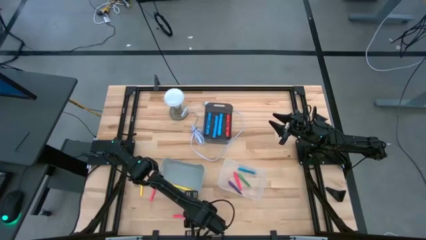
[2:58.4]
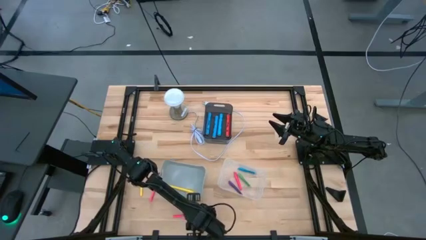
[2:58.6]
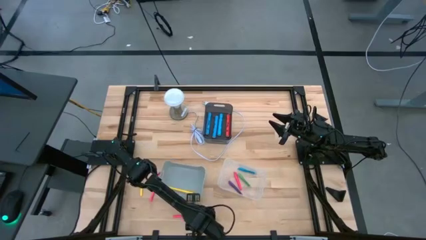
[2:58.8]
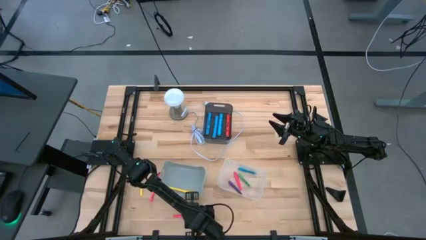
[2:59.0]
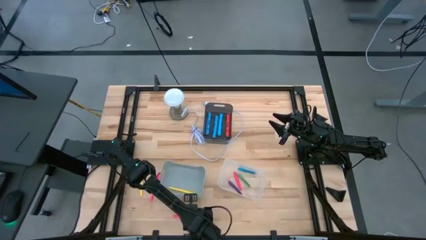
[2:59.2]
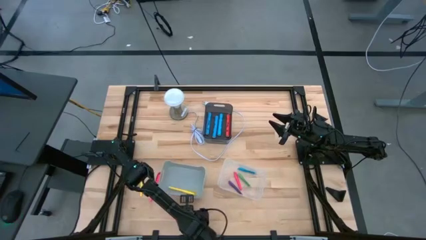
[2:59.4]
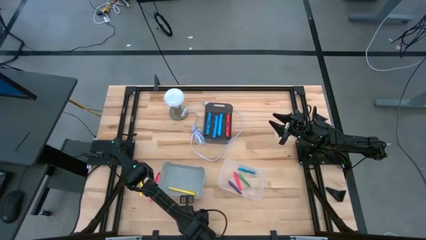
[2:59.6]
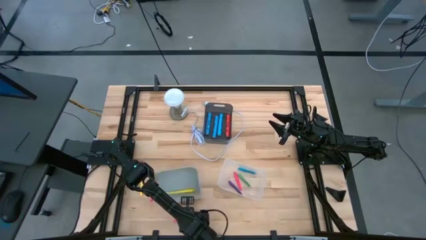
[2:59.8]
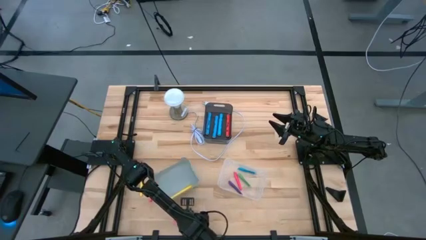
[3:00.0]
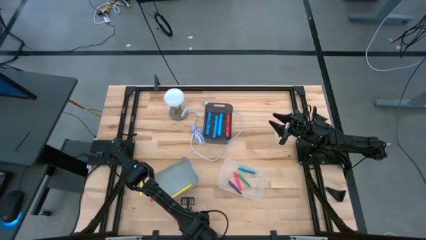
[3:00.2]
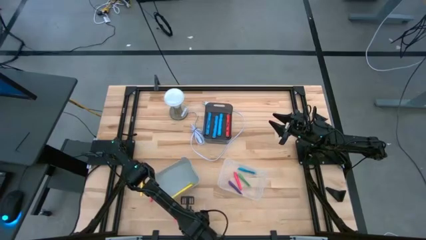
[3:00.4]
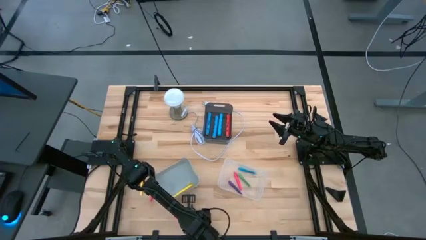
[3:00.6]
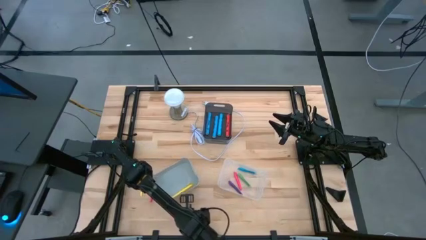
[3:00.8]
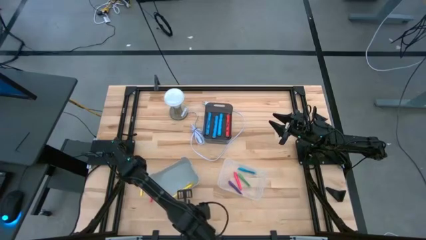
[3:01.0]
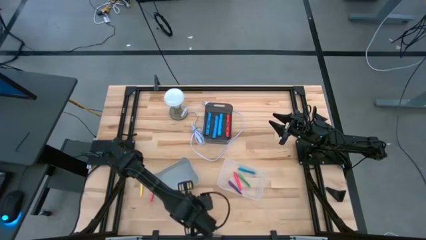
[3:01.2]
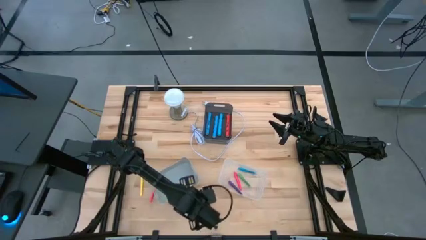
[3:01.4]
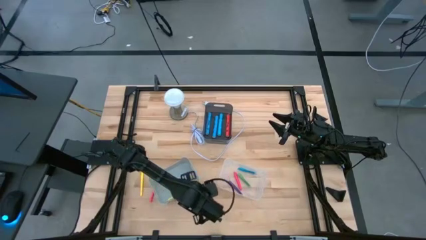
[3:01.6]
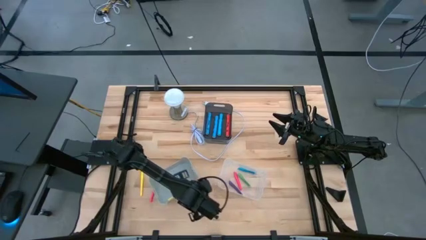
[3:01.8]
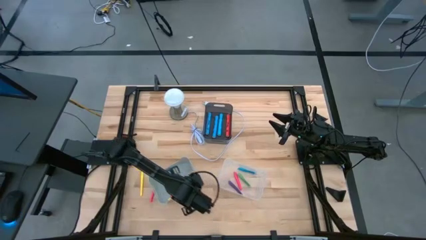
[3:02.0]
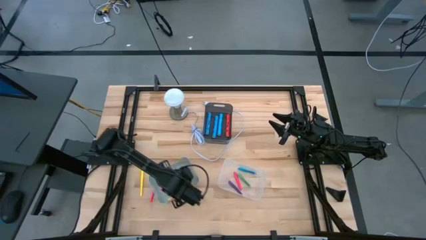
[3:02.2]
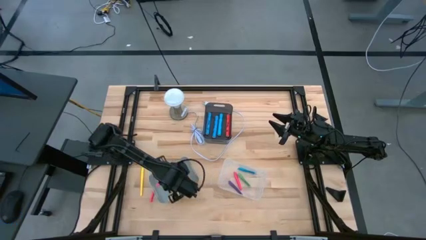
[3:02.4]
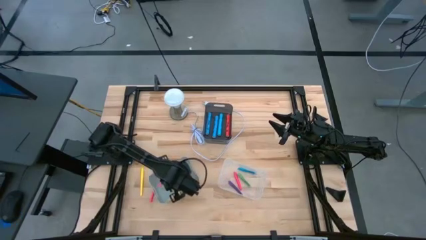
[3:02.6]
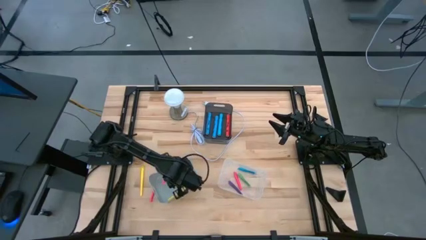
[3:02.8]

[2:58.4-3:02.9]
Task: Pick & Place Markers
Put the bottom pink highlighter pen into the gray bin

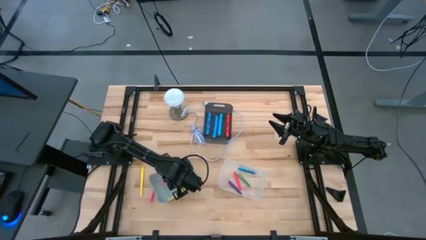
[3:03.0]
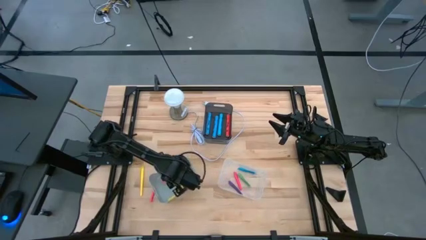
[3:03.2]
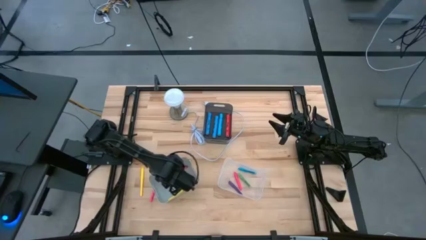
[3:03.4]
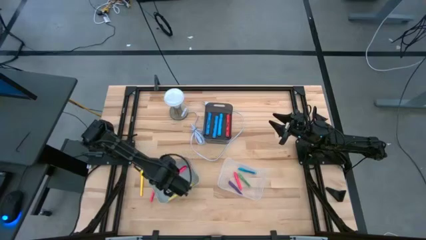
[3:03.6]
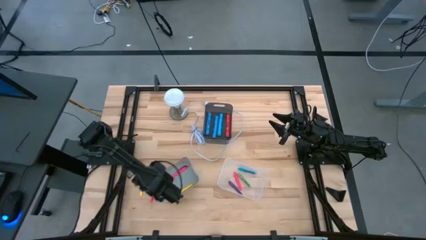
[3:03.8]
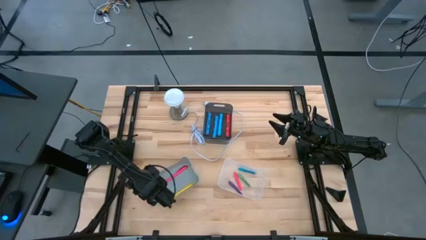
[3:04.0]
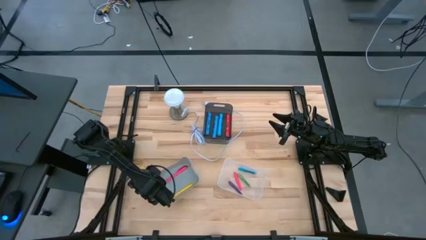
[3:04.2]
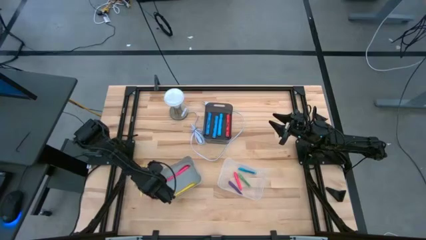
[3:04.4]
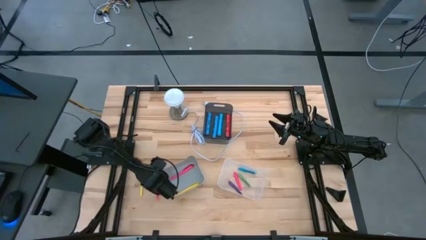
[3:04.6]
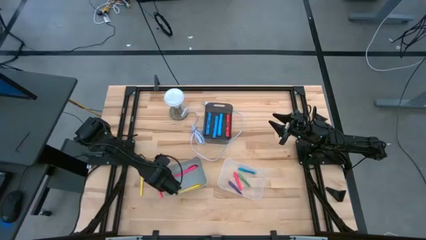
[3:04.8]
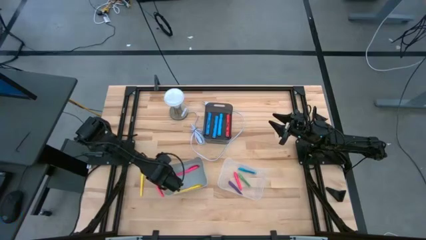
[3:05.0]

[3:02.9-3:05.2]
Adjust the gray bin on the table

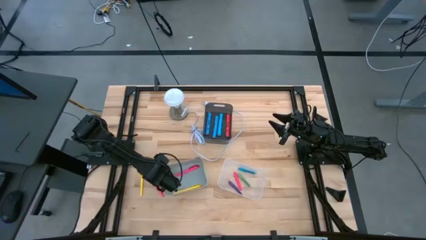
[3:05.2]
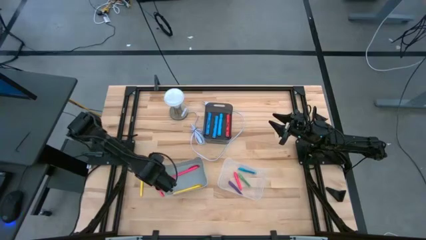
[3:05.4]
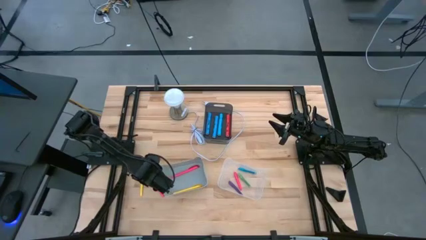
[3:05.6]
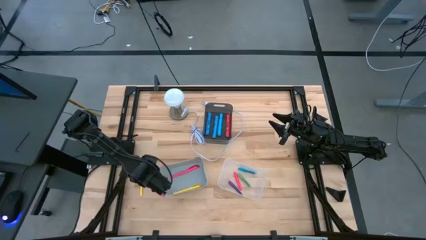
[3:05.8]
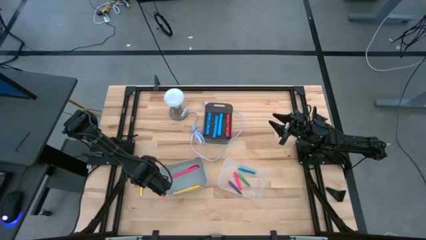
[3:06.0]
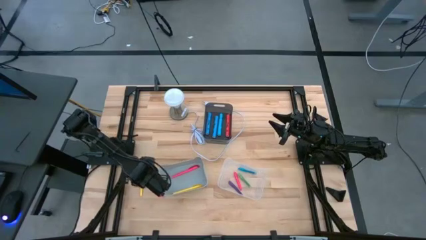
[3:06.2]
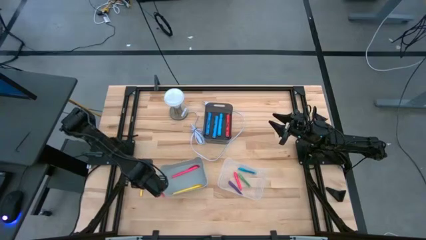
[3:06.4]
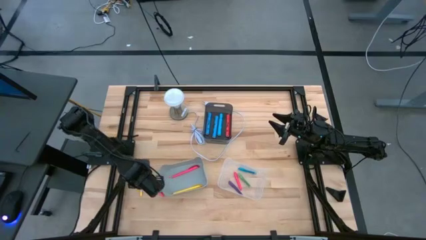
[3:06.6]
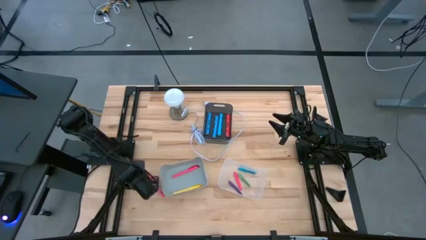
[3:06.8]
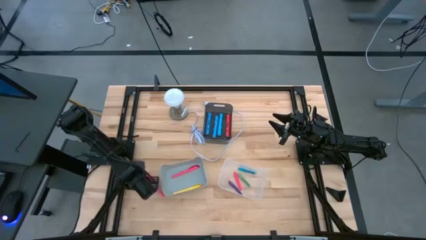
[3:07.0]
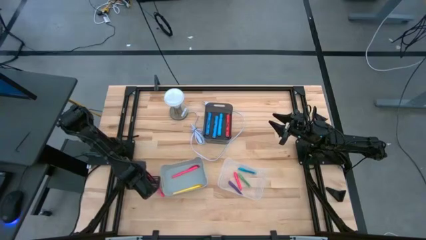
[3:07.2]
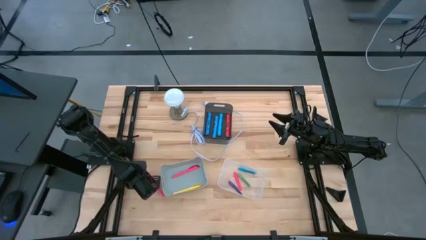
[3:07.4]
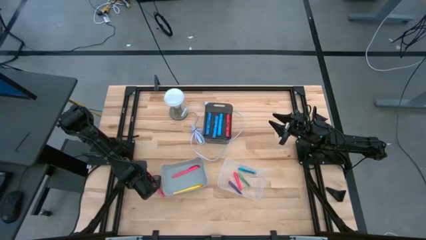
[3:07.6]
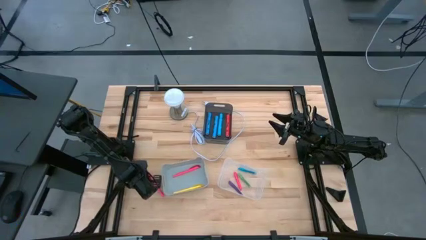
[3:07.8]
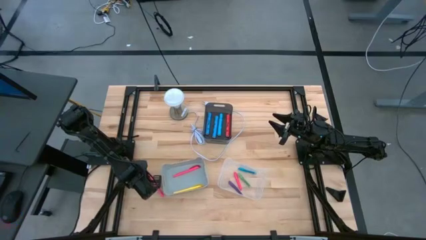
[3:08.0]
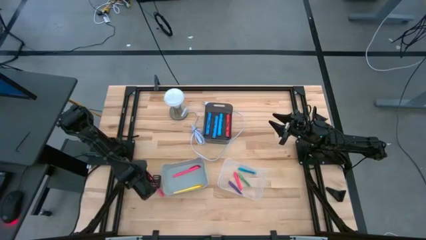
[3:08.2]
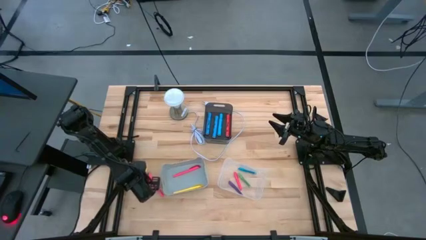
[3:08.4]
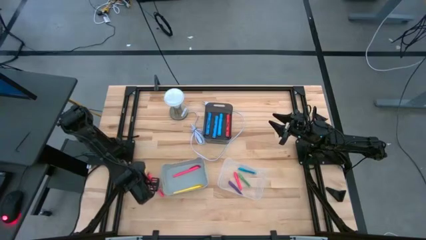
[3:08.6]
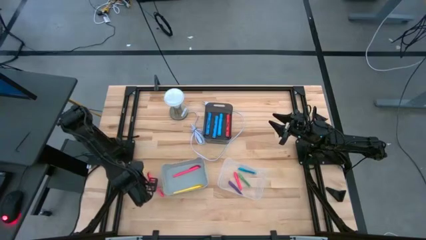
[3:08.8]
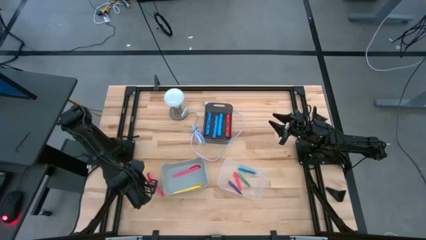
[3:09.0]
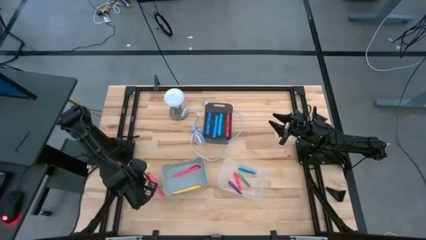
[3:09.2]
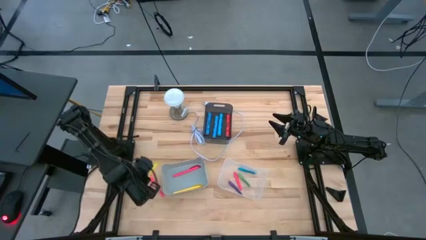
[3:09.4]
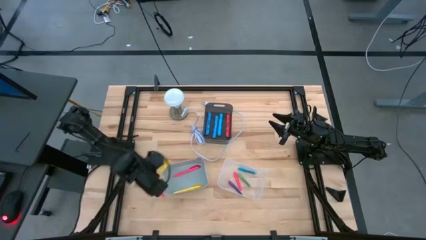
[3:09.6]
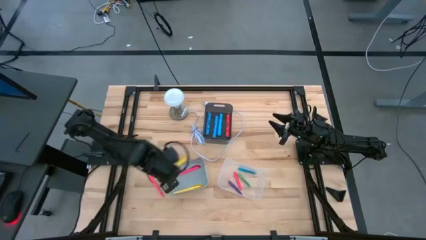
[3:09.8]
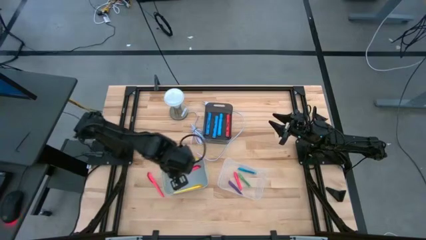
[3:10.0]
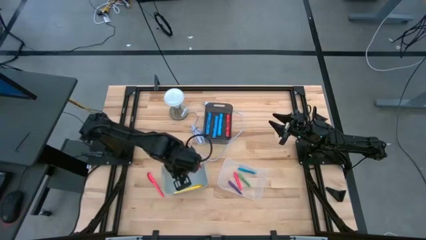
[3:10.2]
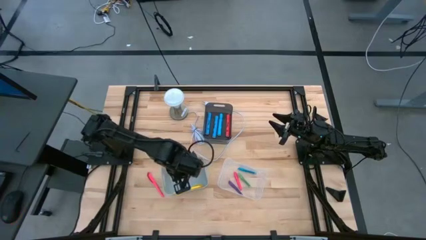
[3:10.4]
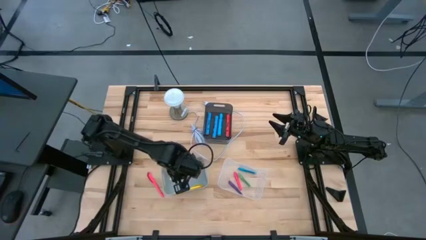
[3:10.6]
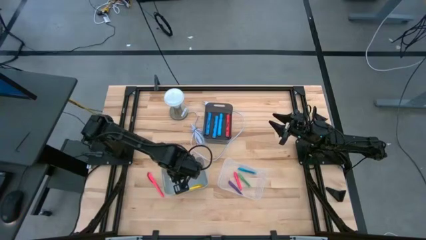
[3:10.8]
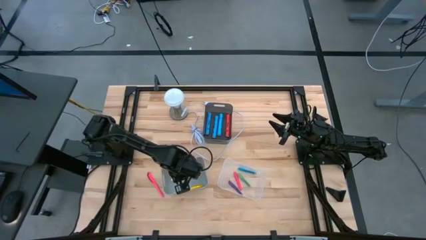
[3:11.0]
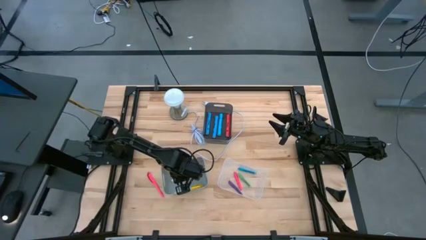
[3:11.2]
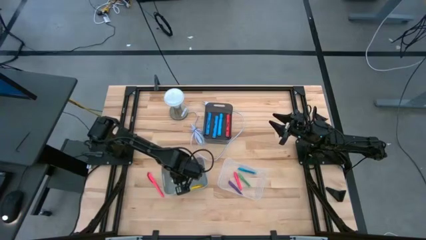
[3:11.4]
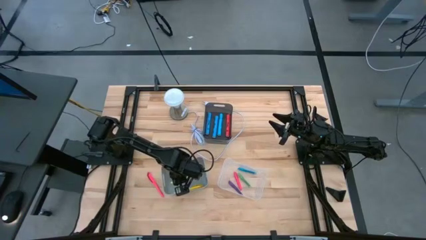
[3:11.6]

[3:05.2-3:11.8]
Put the yellow highlighter pen into the gray bin

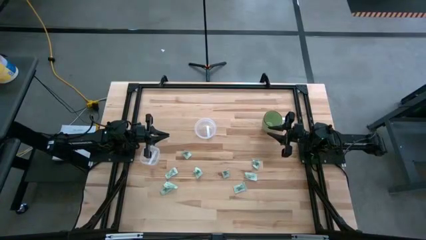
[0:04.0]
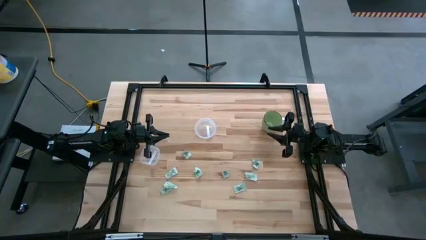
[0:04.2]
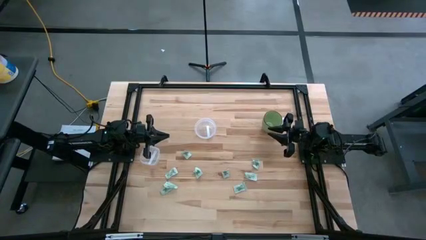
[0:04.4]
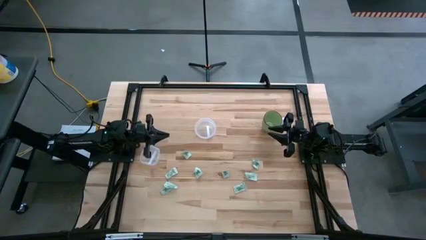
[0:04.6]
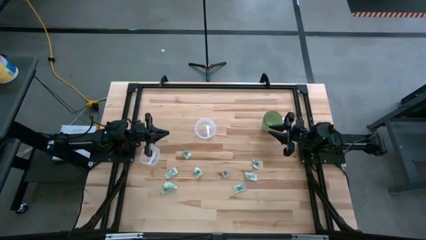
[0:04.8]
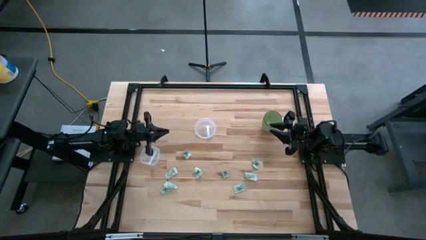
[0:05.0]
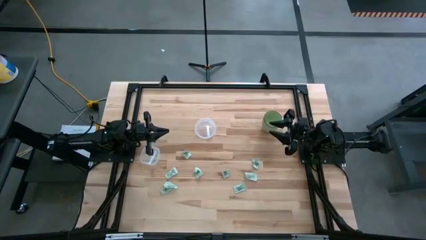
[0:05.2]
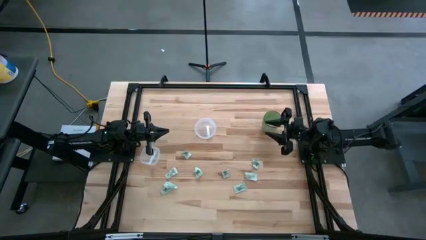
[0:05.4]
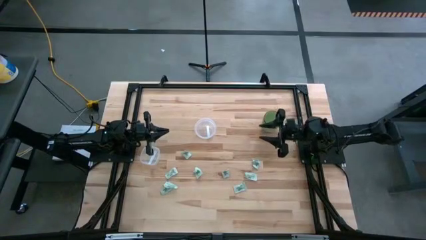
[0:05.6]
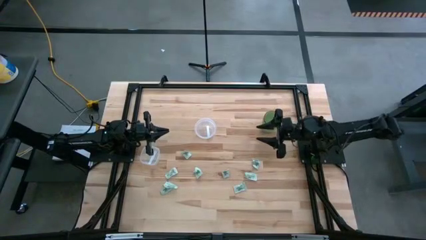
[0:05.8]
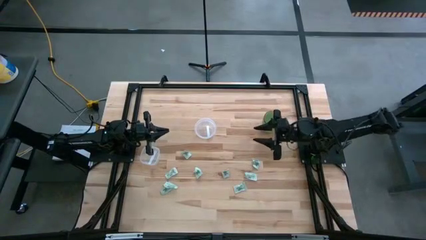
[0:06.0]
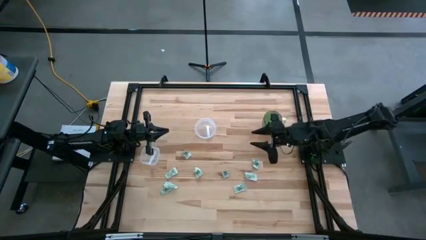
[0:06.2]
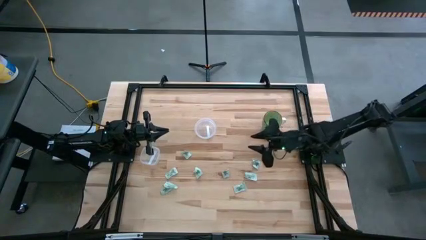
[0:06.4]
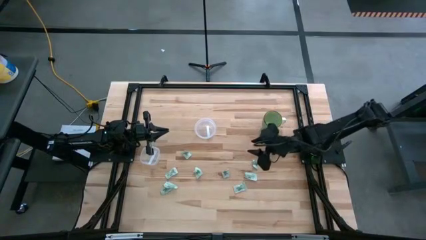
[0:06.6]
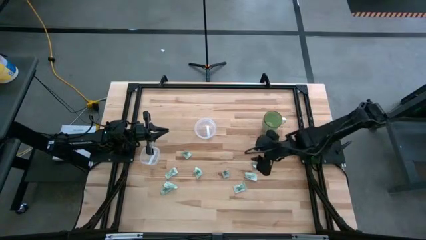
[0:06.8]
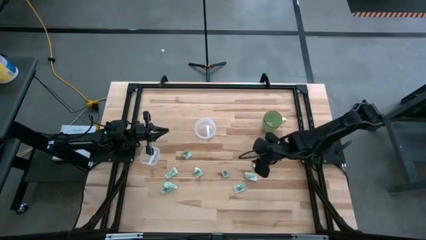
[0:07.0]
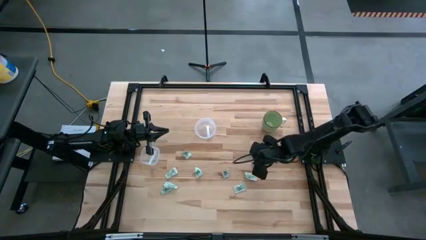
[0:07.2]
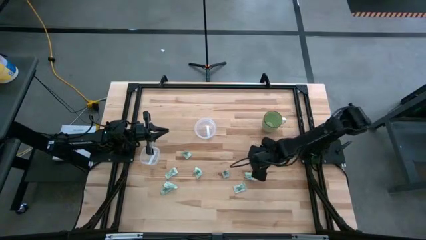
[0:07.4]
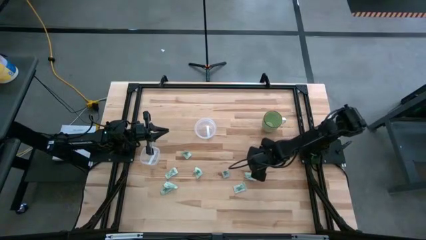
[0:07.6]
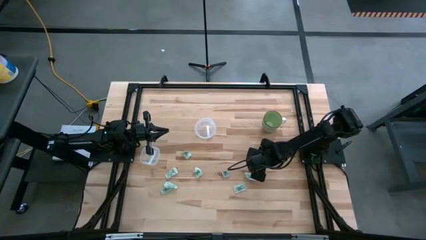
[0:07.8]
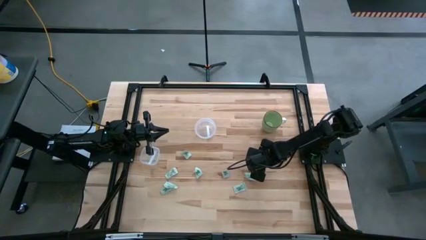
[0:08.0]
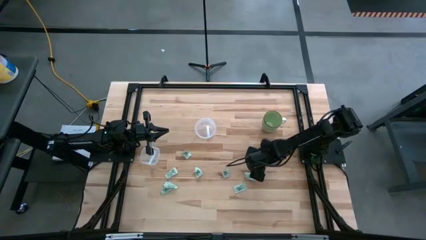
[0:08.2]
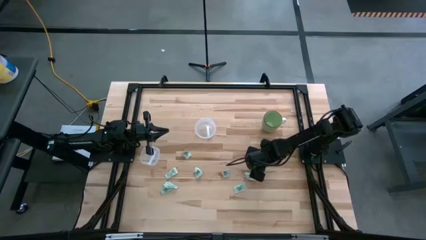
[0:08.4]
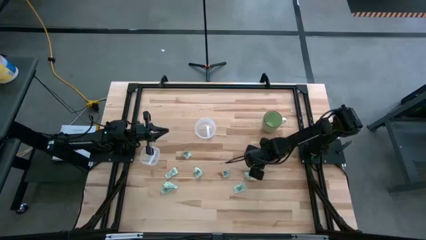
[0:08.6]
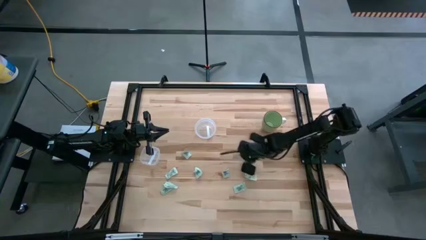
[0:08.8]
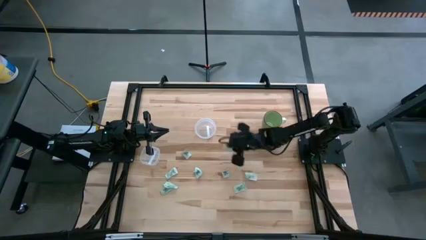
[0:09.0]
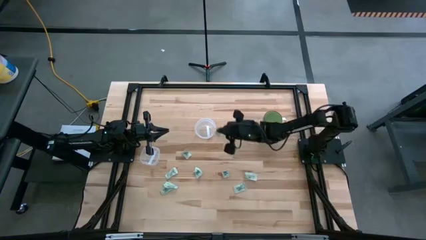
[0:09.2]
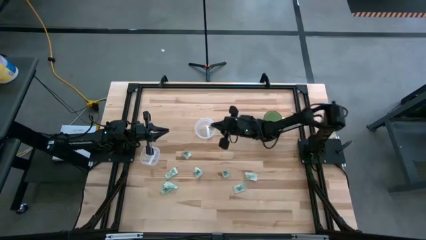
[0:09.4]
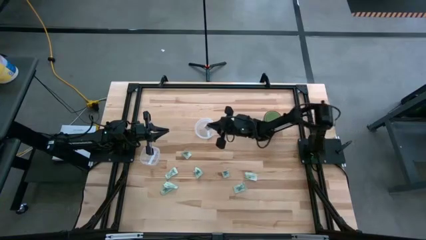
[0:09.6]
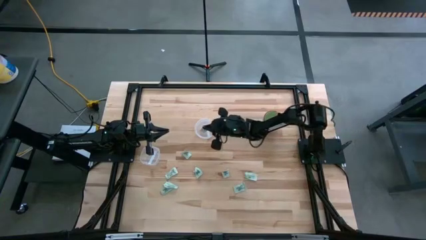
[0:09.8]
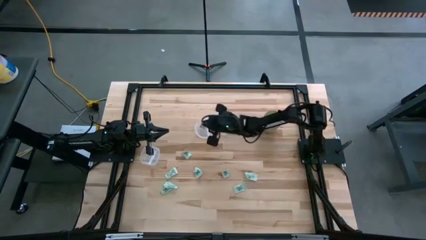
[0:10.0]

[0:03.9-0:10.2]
Task: Pick and place Stevia / Truvia into bins
Put the stevia packet into the right transparent container
